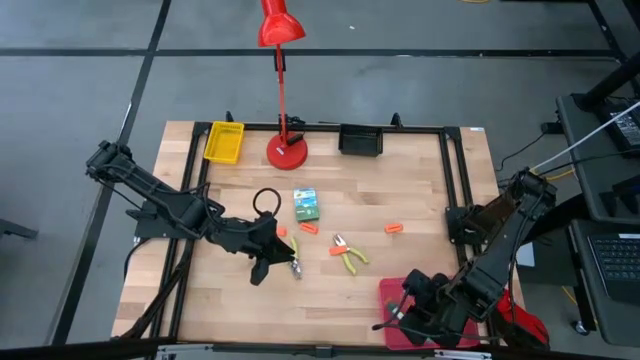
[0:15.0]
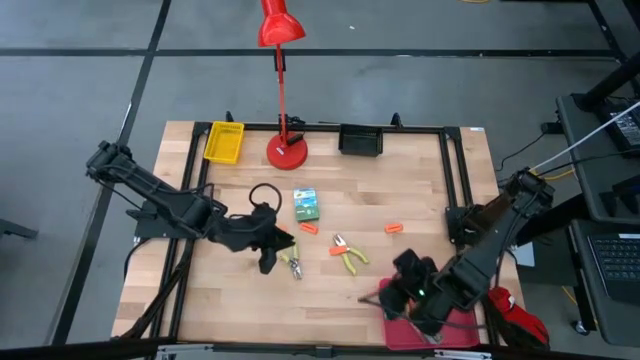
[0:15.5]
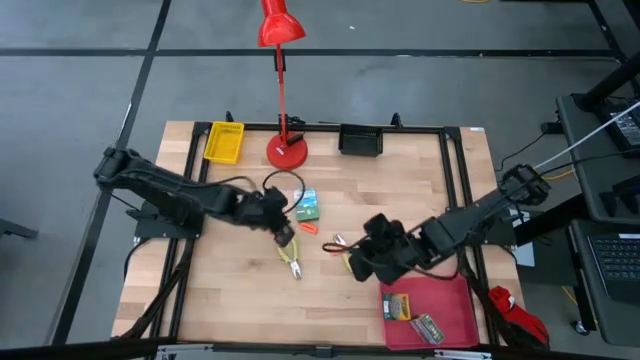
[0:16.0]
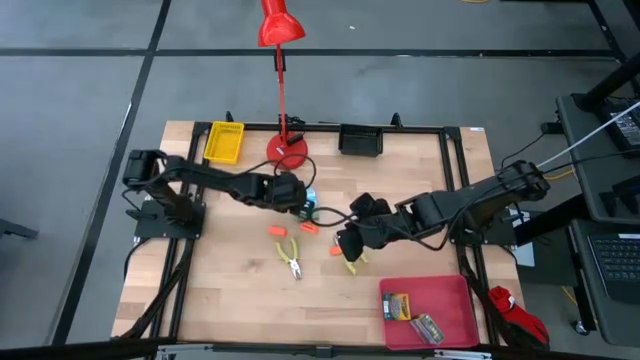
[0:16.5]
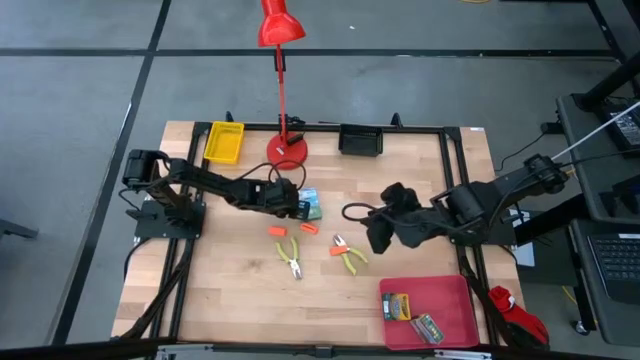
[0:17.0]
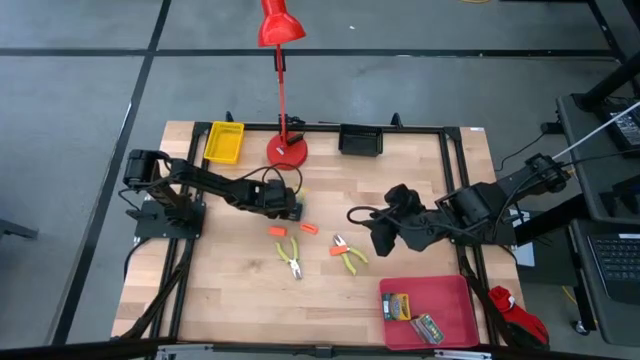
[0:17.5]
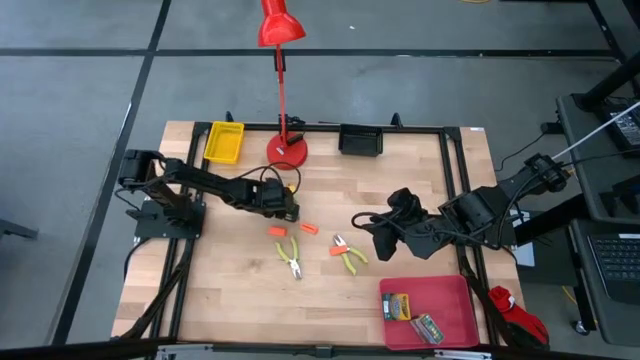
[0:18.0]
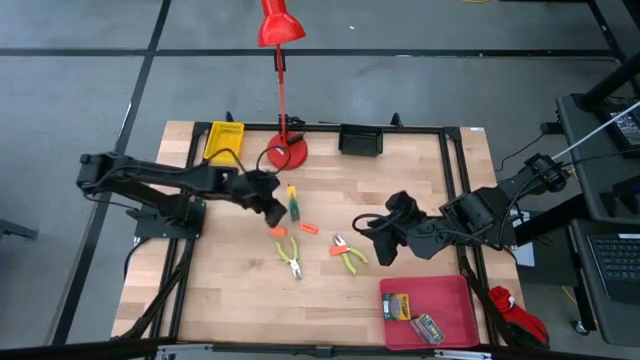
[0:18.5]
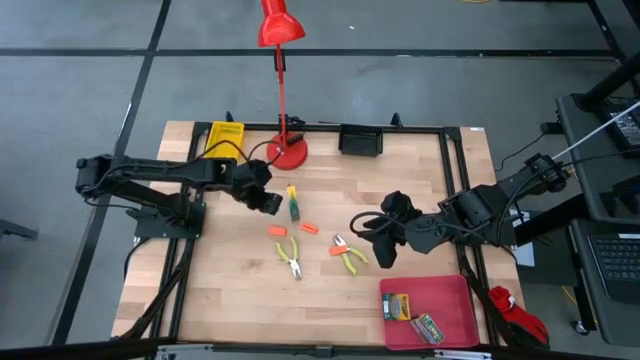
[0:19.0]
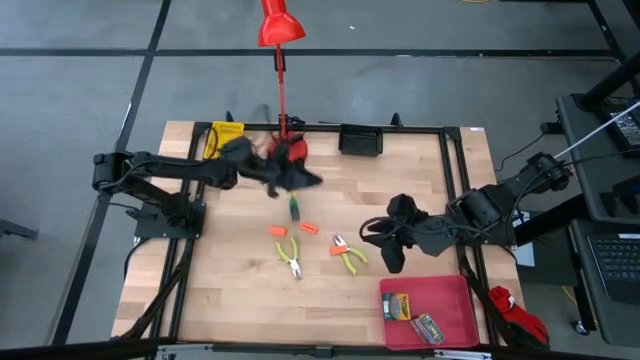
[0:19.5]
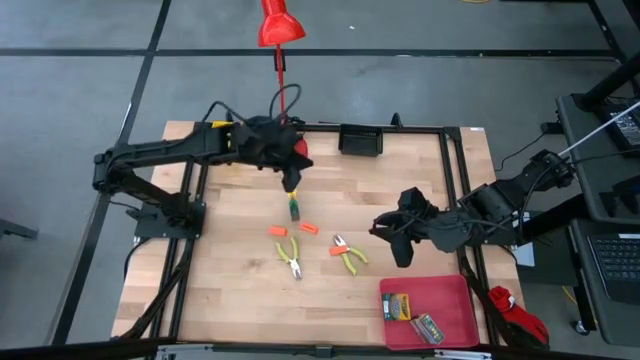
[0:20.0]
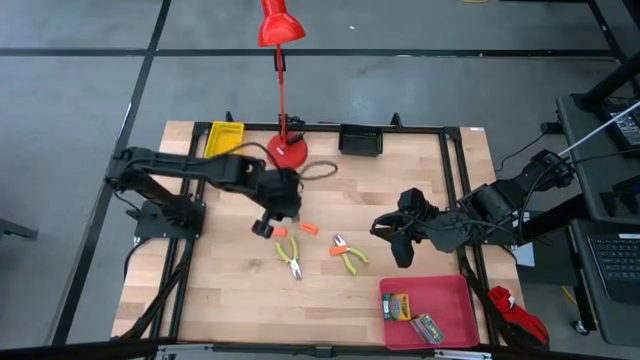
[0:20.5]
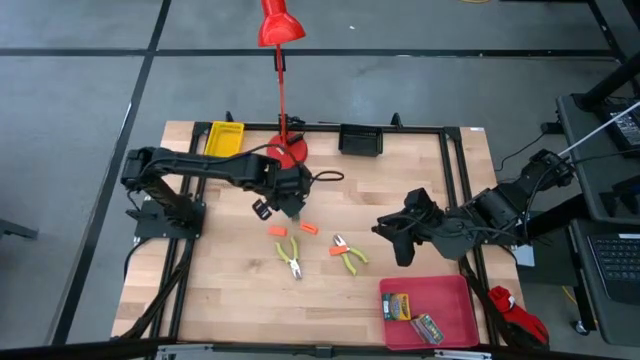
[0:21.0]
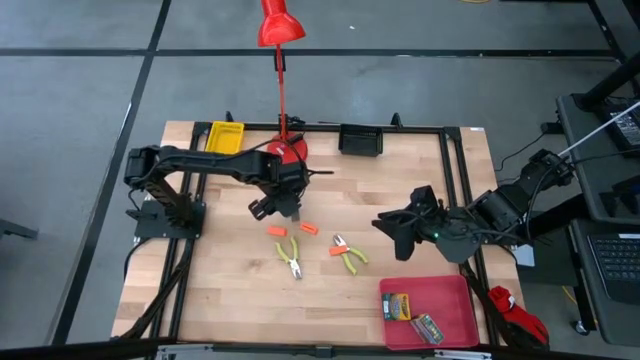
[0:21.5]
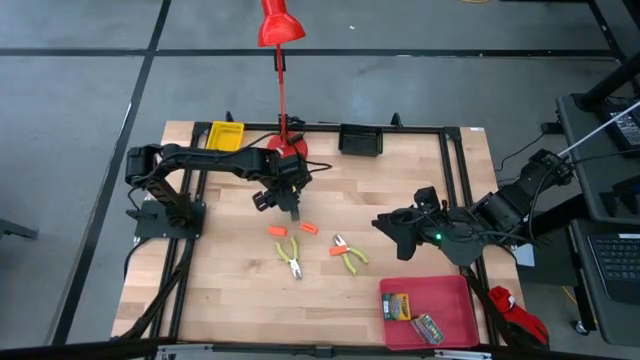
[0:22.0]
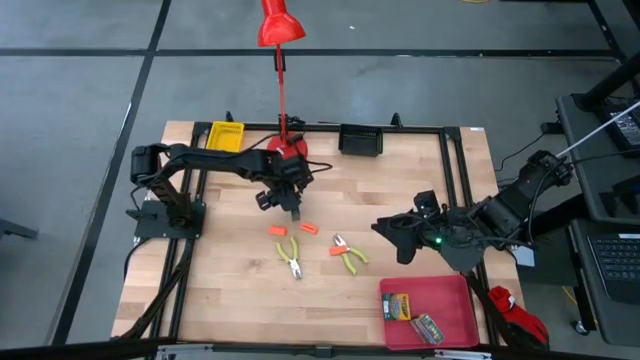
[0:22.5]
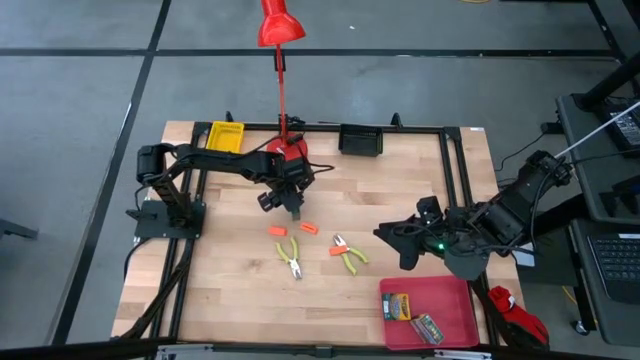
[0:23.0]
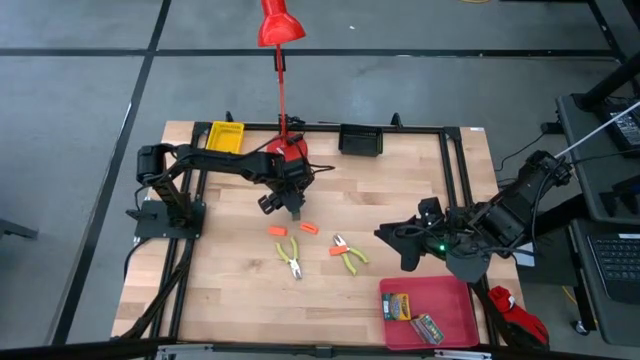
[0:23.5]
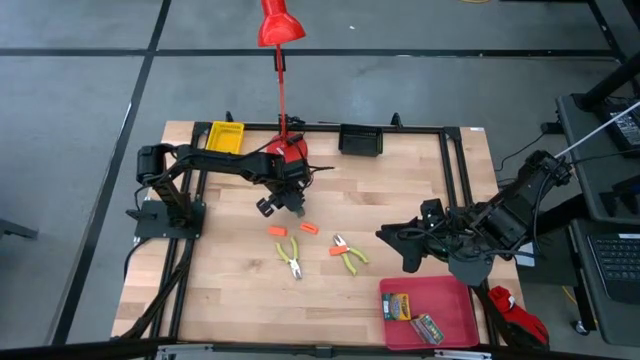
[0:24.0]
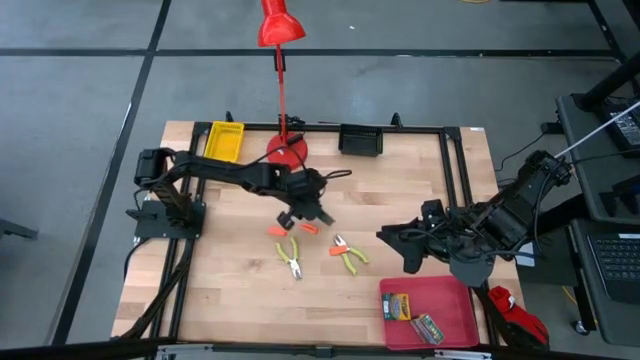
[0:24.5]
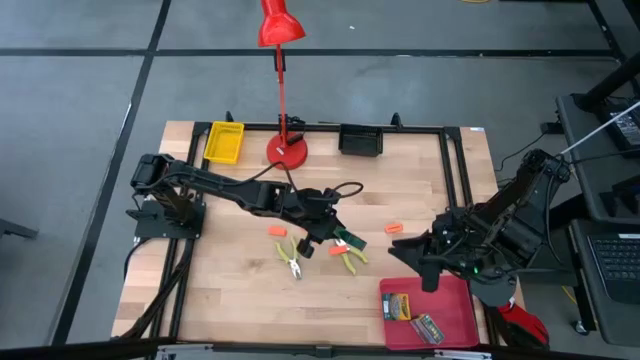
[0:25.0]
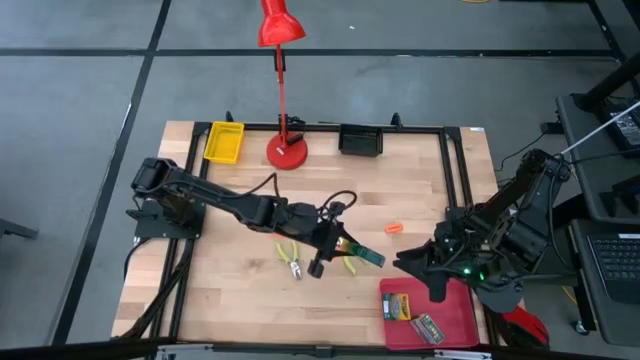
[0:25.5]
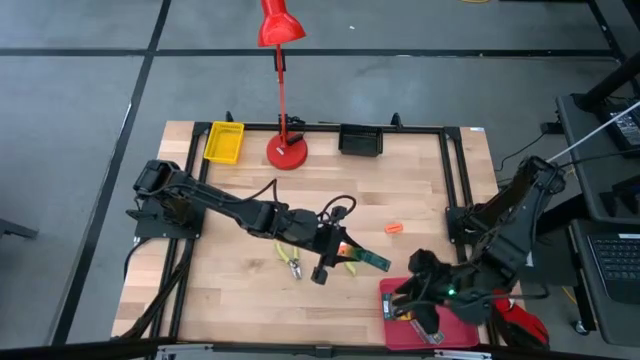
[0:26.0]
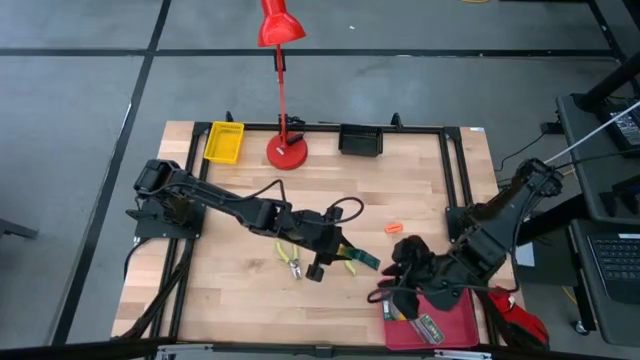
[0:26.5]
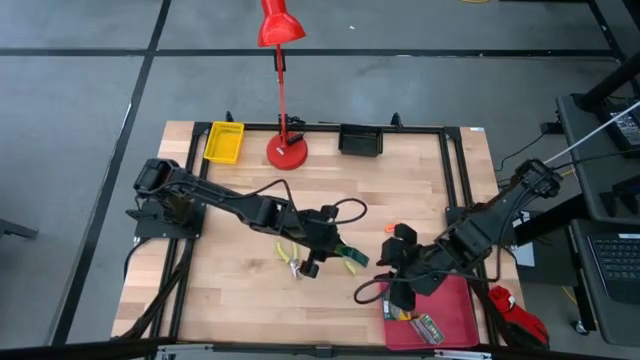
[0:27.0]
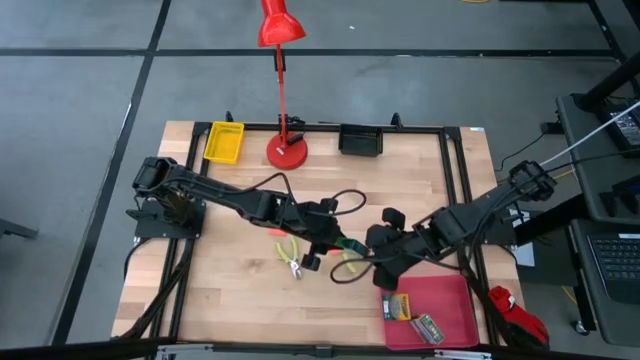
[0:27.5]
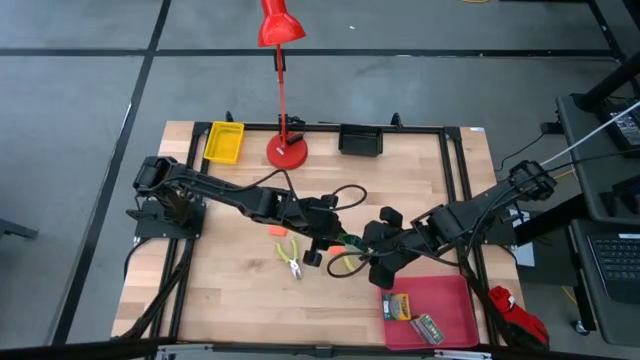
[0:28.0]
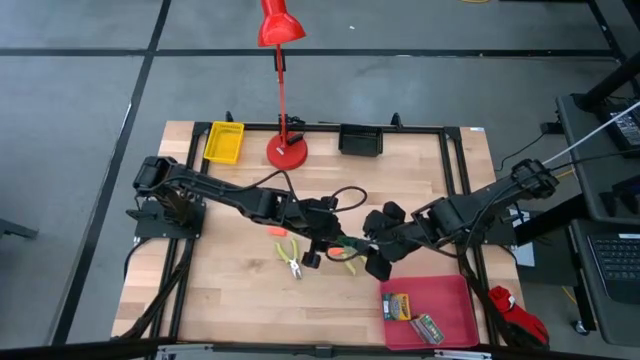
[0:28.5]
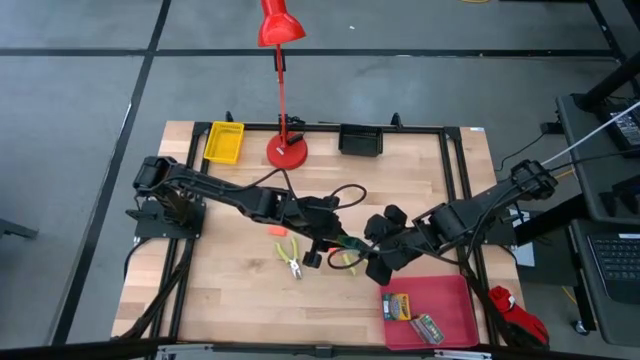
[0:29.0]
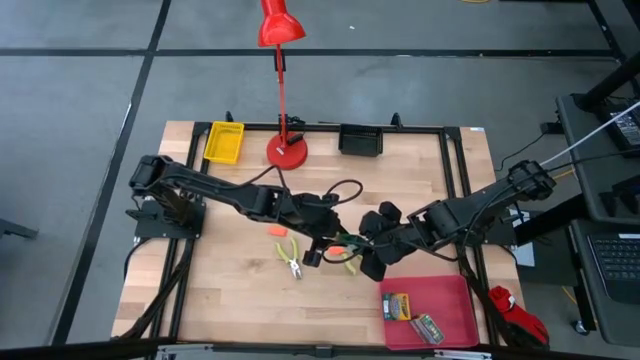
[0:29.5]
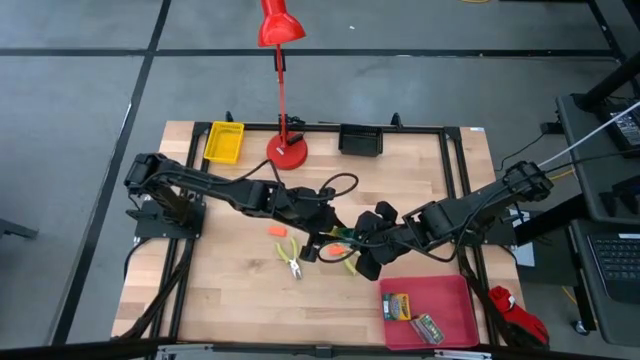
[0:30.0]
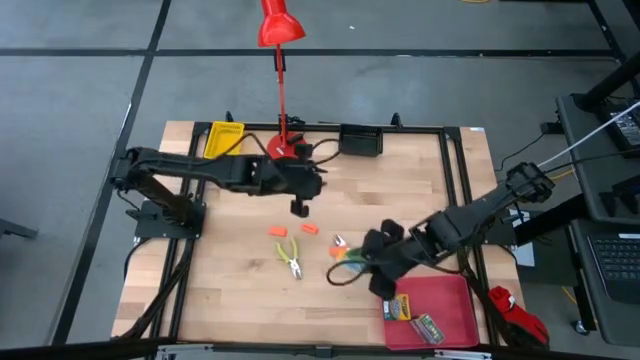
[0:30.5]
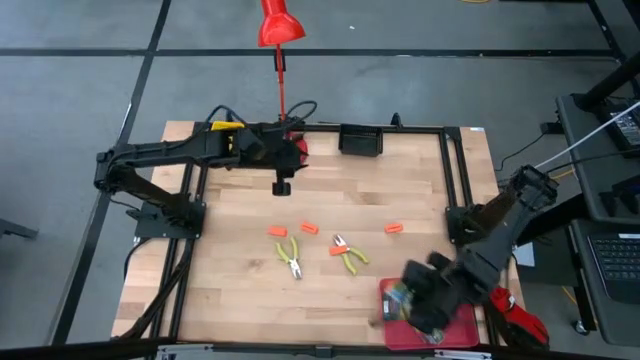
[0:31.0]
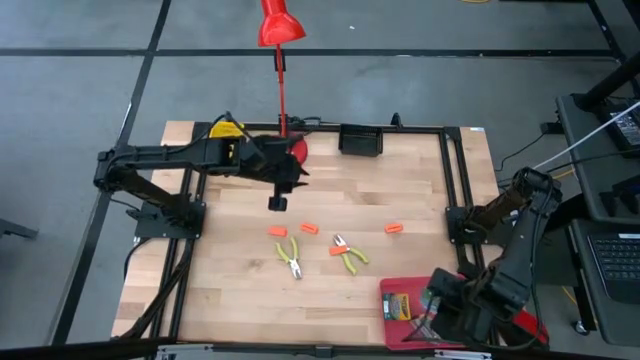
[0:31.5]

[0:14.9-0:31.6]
Task: Pick & Place School Supplies
Put the yellow crayon box into the red bin

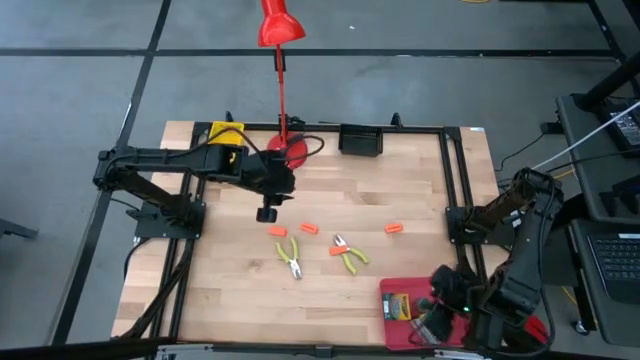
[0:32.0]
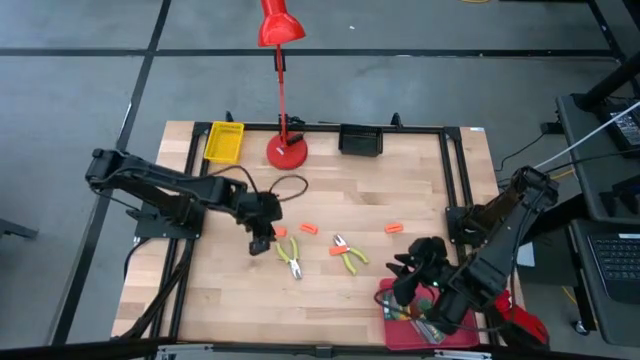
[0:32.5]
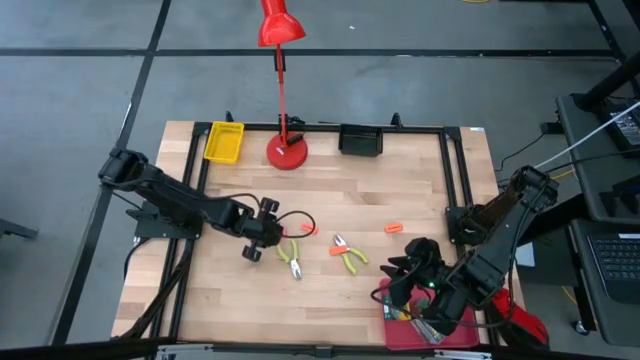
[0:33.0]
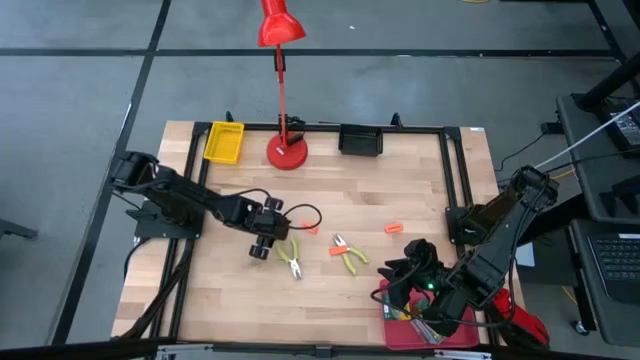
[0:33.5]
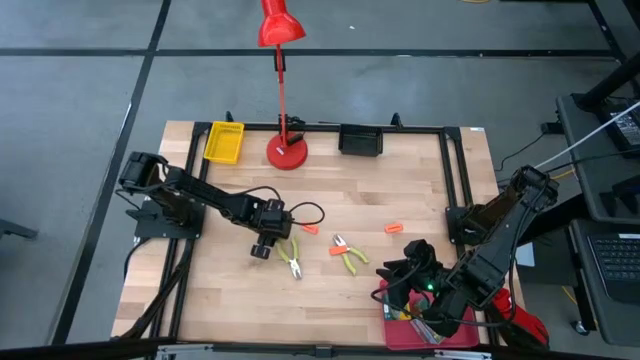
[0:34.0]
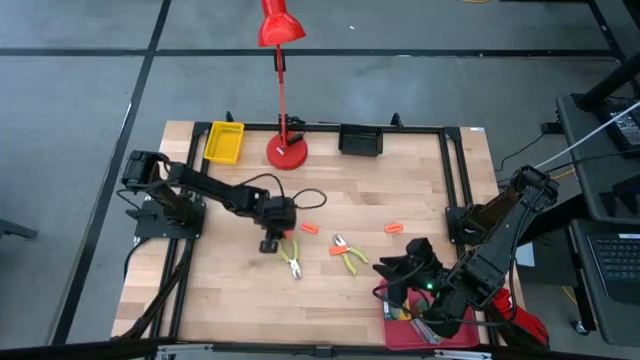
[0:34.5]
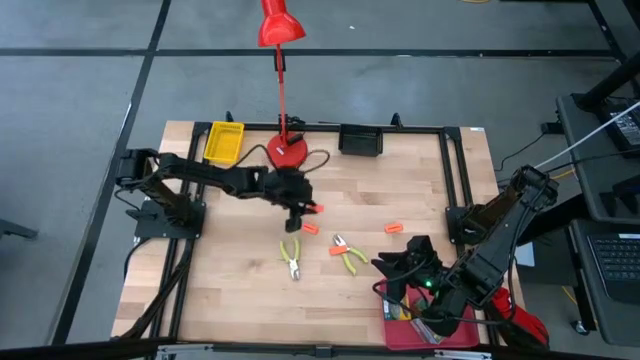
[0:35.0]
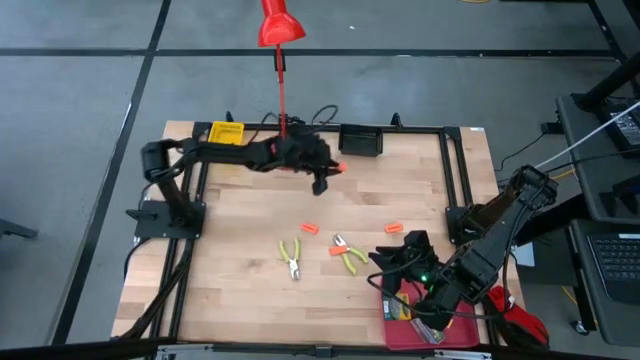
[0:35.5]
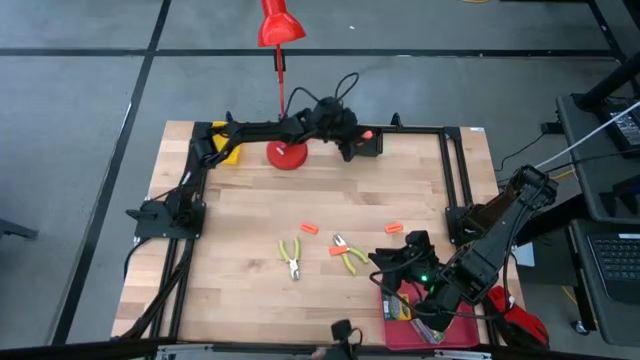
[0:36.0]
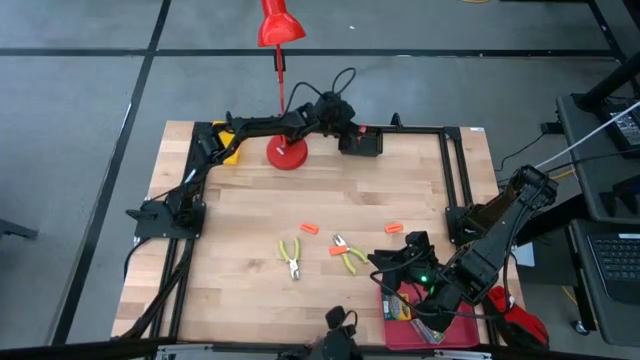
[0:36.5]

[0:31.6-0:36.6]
Put the orange eraser into the black bin
